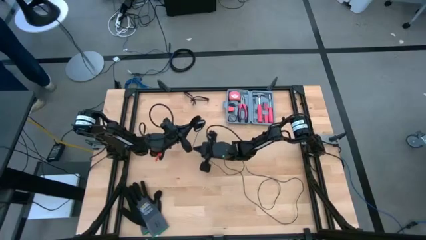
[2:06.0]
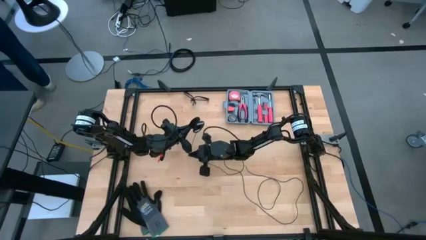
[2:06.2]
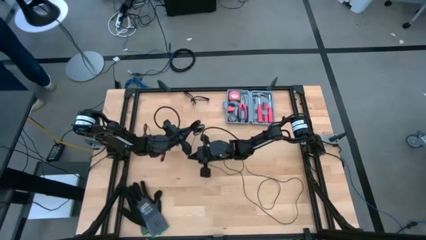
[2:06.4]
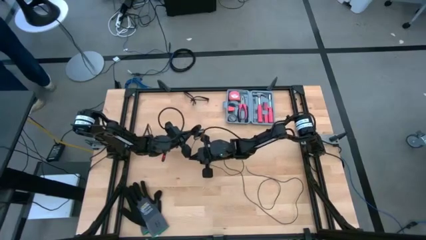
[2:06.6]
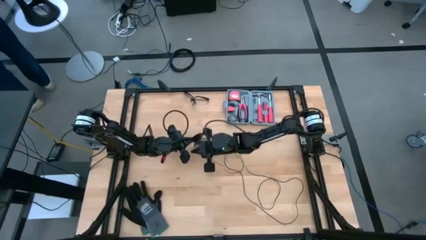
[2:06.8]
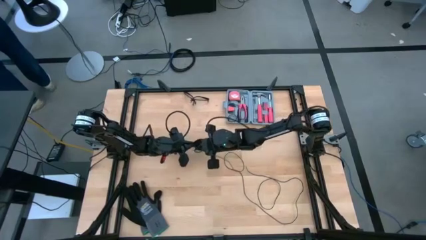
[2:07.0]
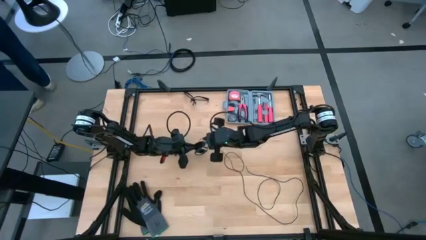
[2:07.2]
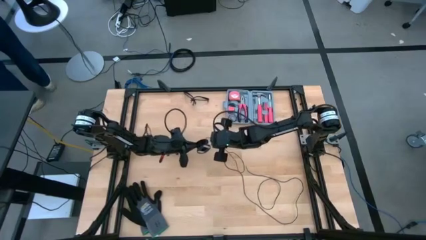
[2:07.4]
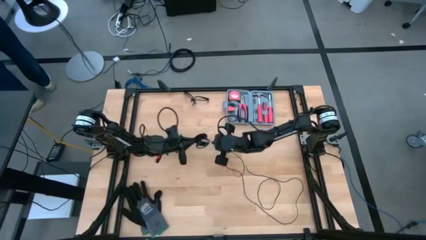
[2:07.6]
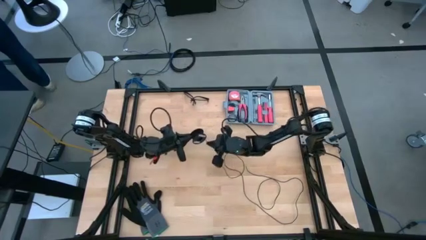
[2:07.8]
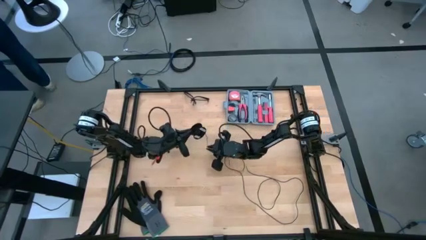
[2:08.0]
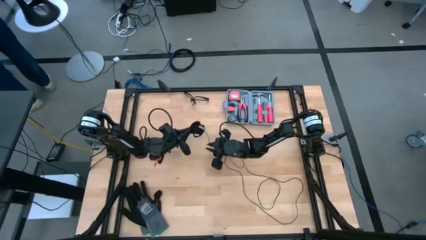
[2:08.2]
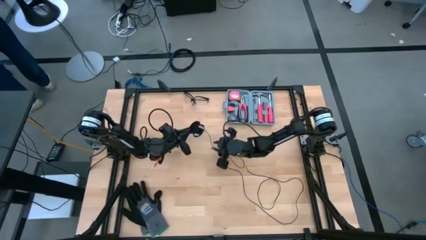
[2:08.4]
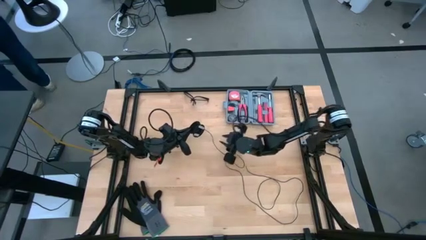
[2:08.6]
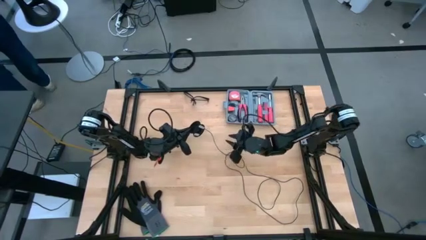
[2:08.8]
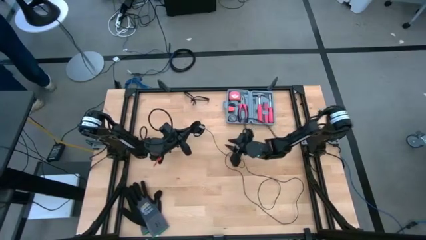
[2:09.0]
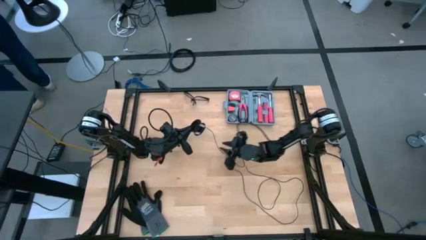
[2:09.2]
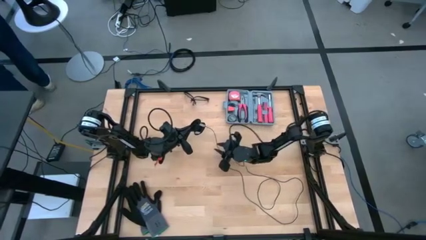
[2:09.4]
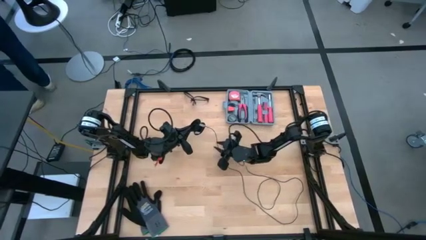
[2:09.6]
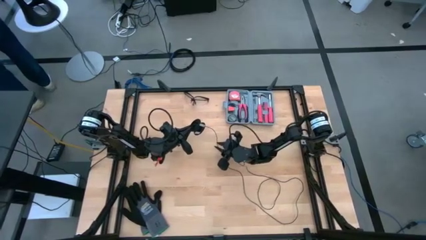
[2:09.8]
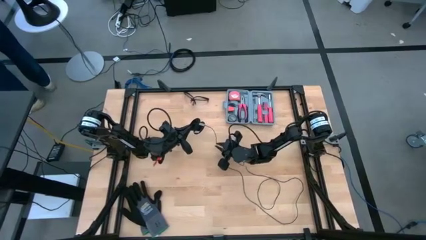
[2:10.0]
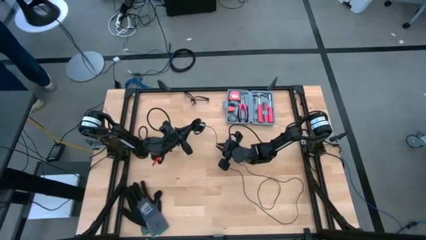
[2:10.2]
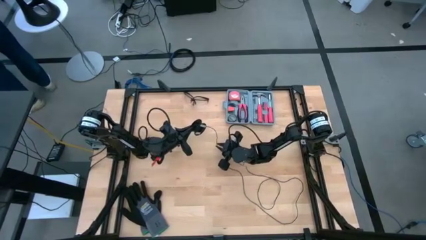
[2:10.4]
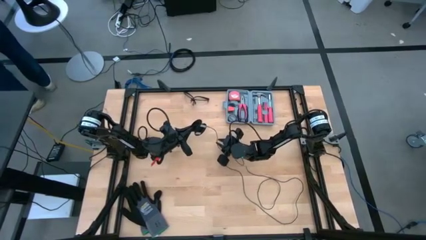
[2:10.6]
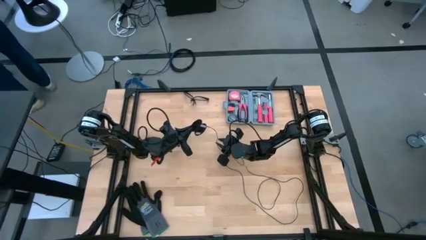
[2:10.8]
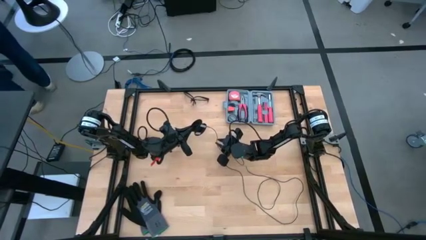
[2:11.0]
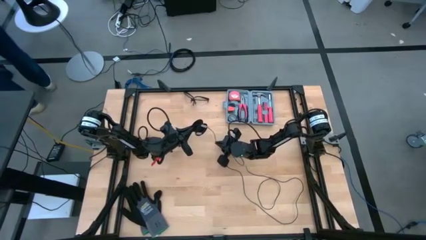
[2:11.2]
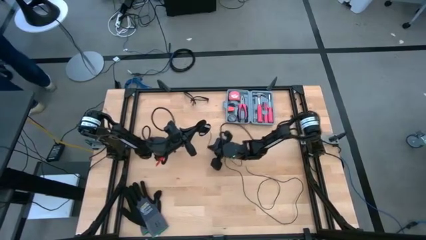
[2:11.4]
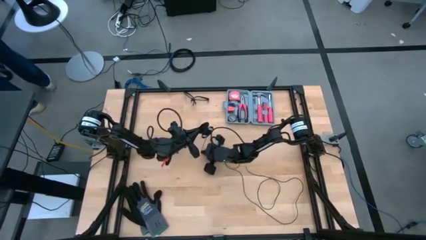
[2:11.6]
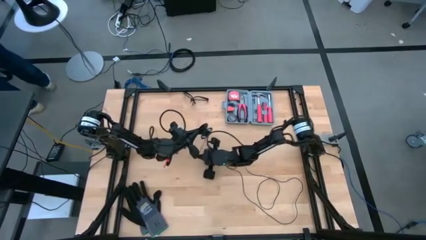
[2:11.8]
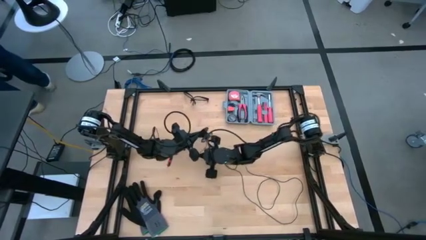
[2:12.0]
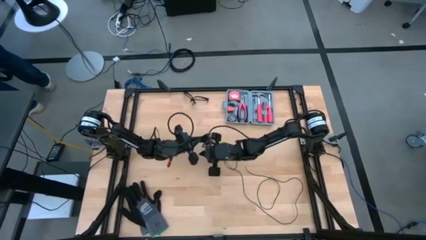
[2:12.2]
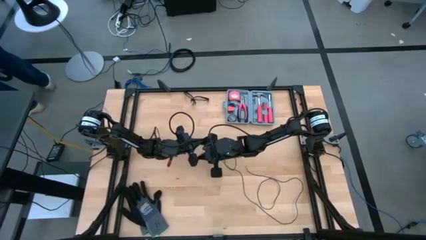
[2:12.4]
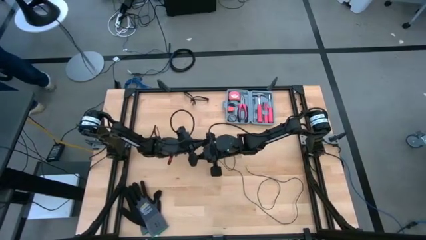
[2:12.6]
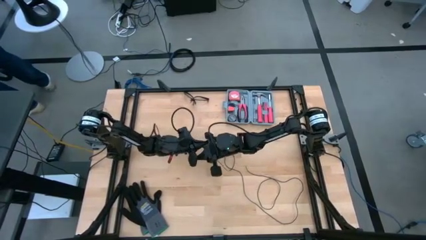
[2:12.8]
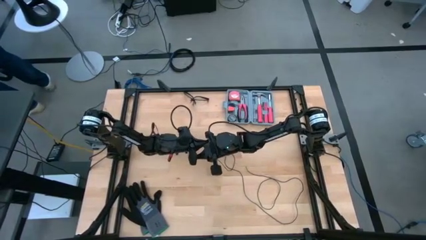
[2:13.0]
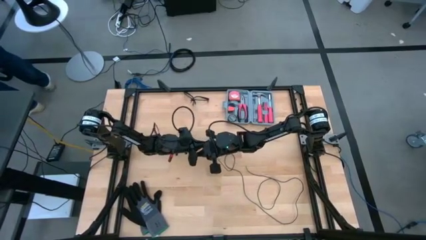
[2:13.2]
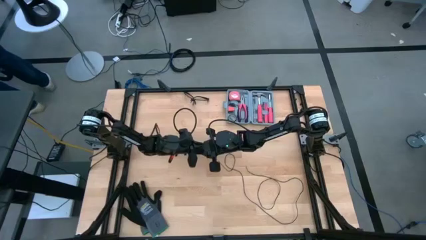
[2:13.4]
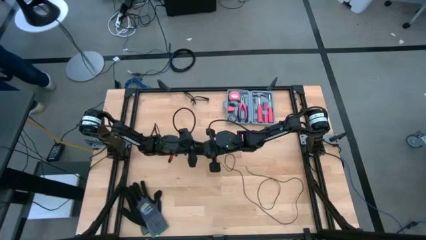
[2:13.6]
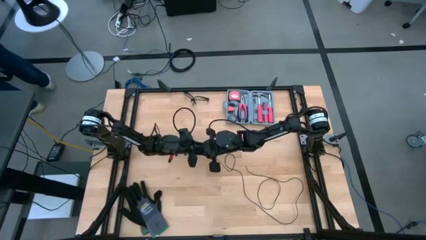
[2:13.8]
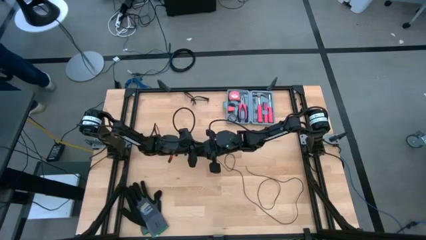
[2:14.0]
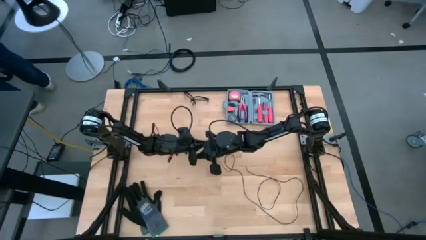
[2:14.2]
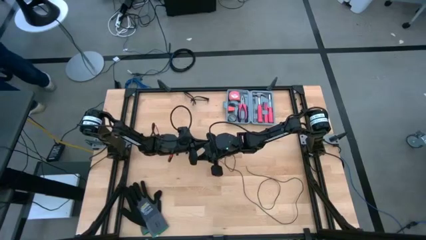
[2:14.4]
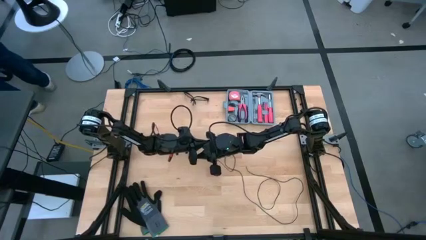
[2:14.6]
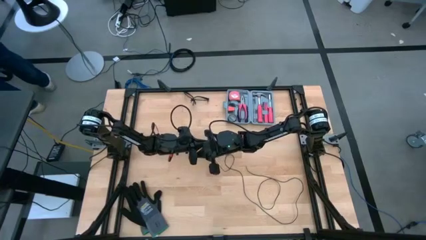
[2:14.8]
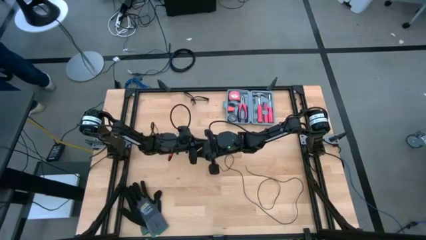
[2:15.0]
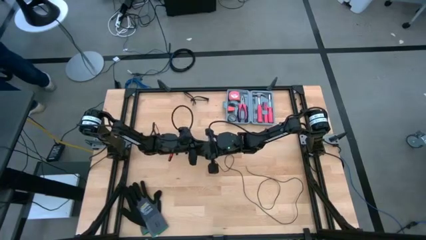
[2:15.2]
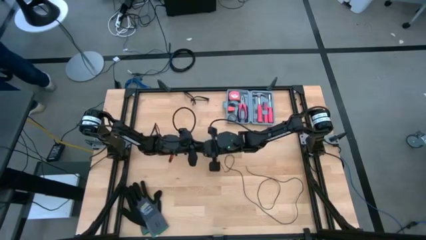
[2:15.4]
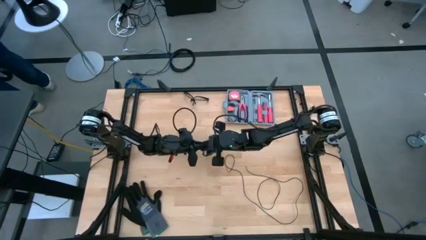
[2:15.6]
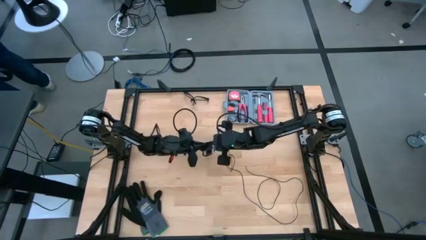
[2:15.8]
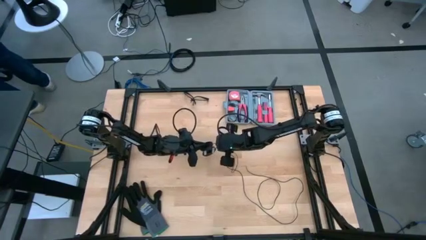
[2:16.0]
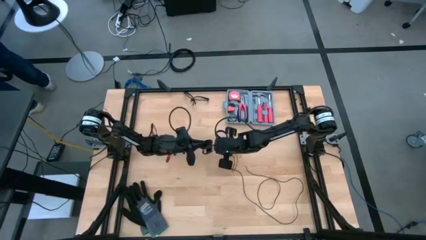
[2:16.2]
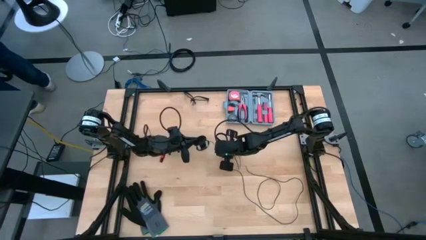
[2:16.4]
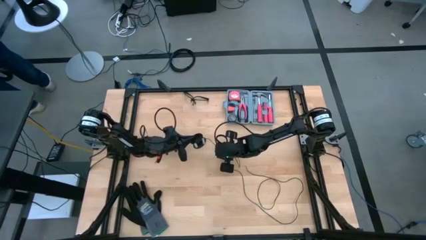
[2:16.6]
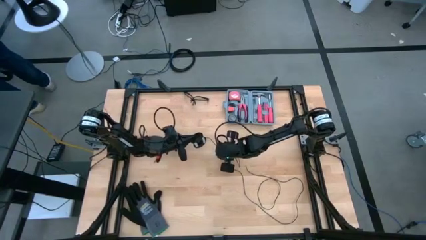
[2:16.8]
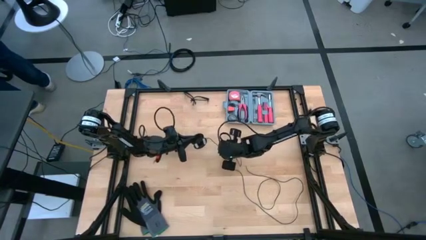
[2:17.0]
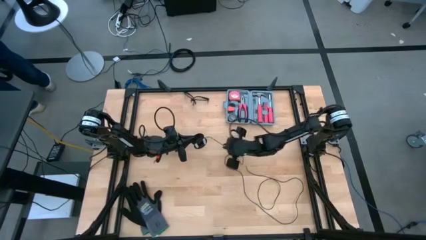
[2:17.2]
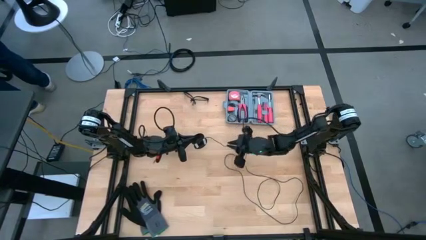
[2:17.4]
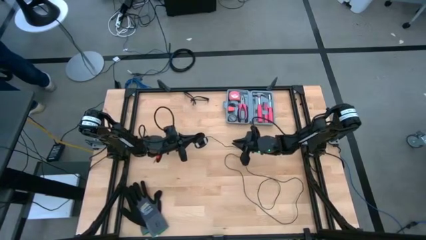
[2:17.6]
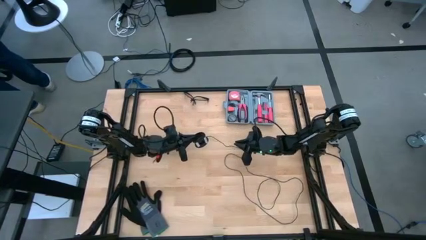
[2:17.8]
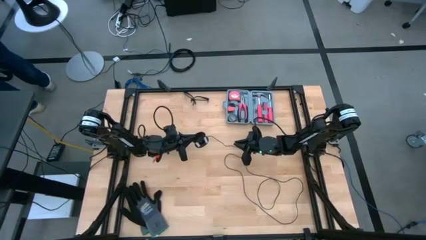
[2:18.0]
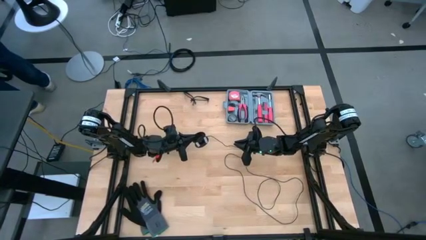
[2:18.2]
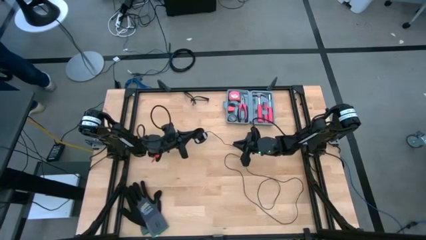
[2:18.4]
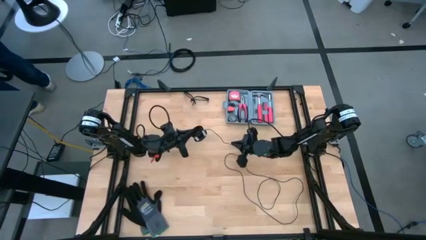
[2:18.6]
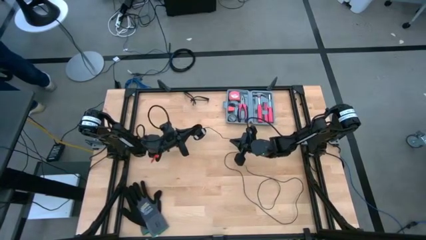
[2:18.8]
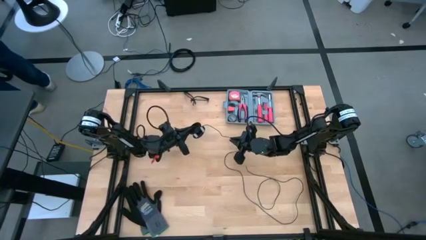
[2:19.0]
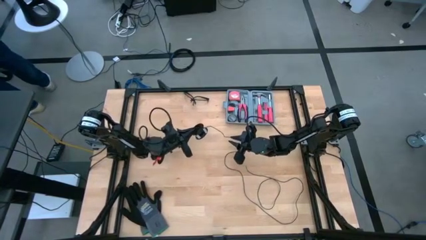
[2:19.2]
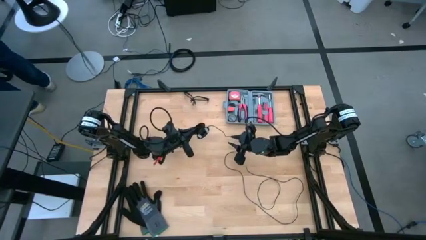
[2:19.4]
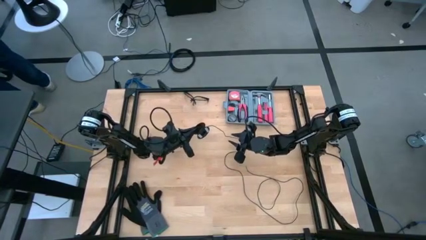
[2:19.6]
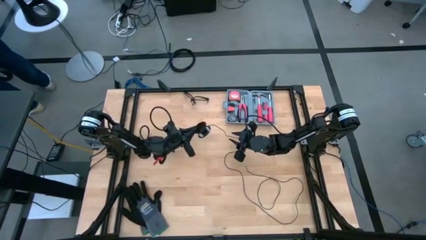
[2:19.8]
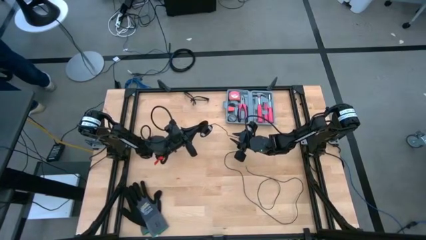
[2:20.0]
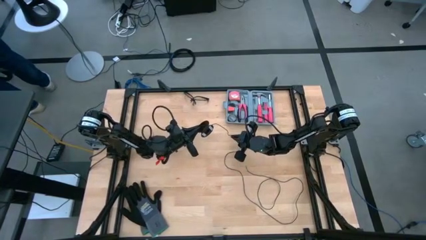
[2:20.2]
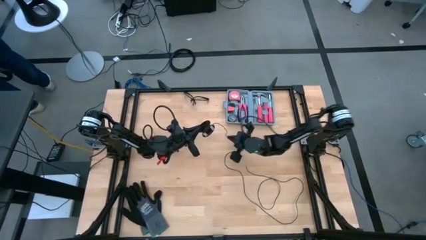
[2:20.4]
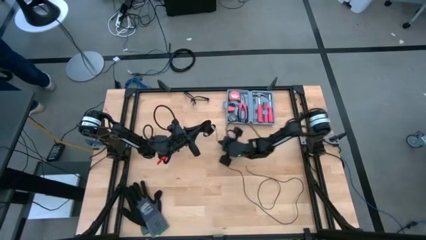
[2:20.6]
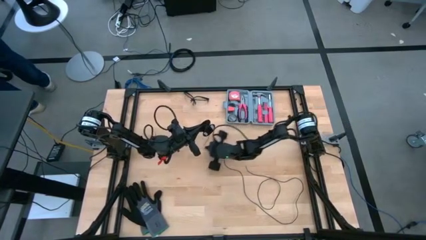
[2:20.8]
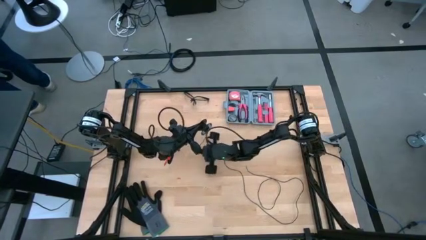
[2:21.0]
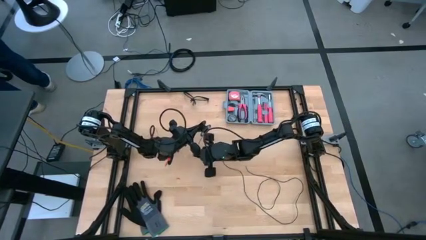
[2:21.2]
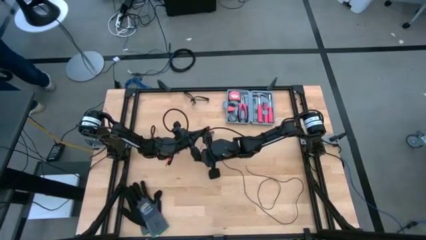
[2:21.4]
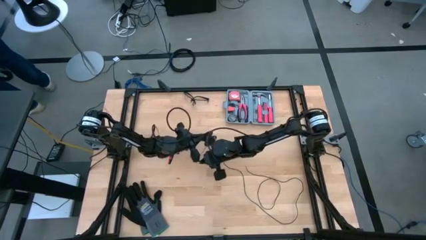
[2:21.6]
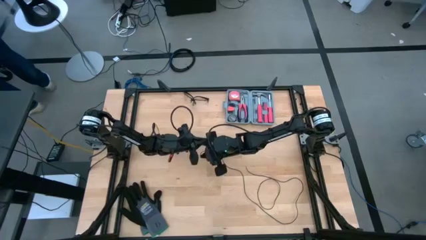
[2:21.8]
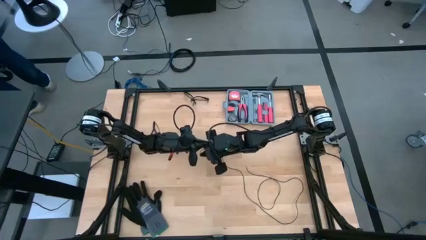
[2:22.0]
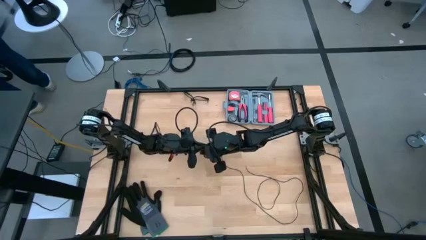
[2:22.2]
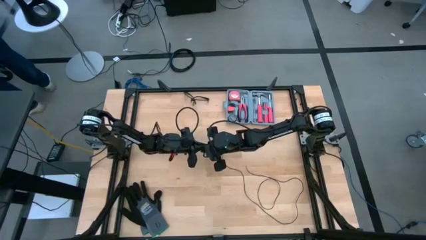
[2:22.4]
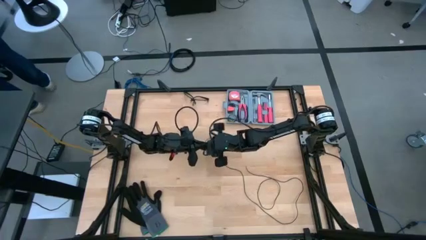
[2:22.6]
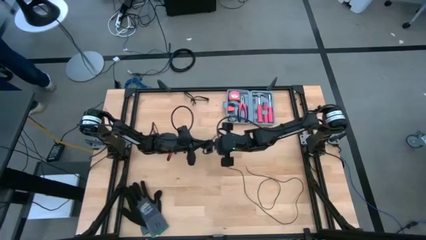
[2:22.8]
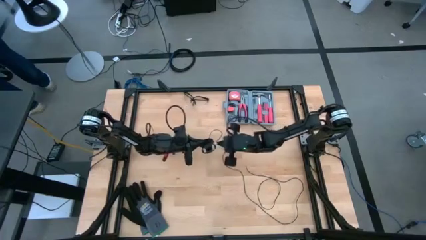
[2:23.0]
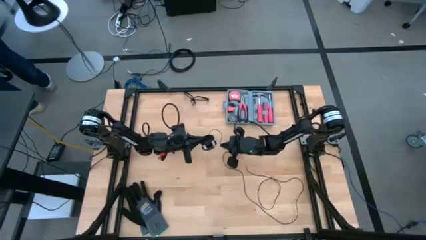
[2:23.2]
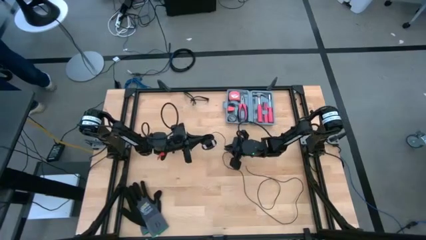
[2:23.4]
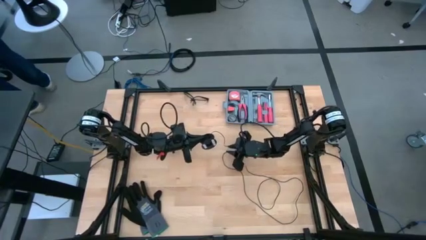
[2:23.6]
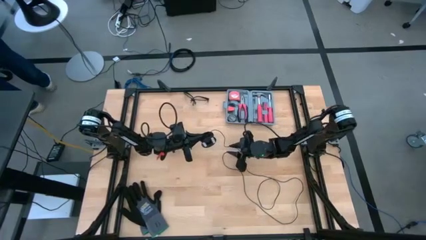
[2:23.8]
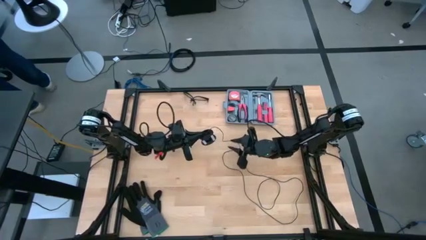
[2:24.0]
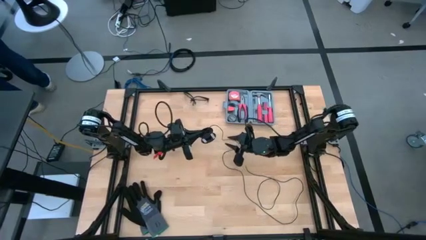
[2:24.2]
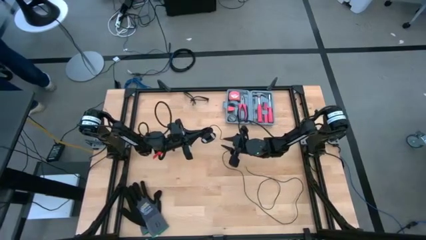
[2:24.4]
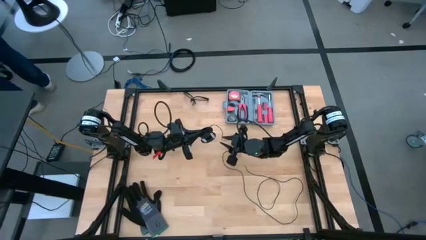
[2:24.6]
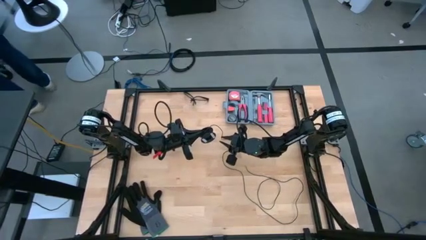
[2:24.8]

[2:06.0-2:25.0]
Task: Coil cords
Coil the black wire onto the spool
